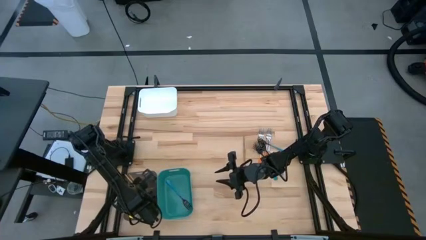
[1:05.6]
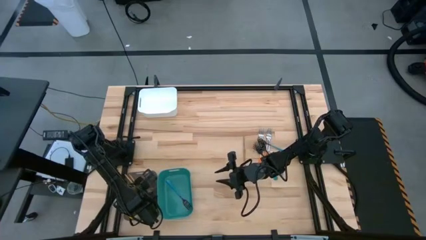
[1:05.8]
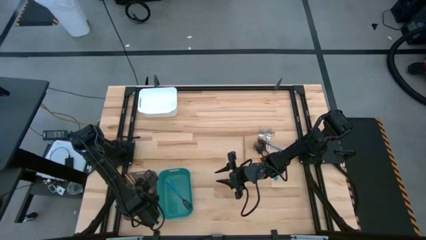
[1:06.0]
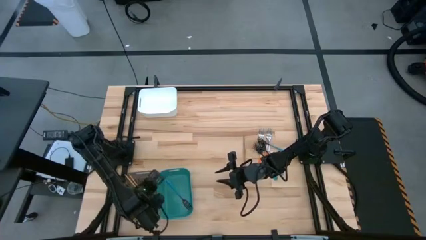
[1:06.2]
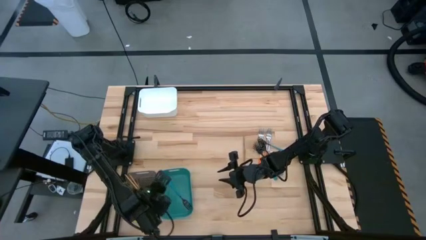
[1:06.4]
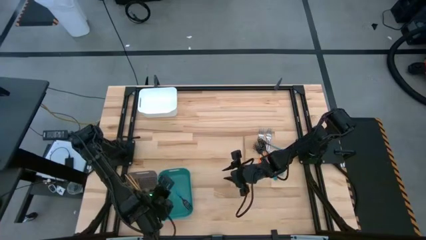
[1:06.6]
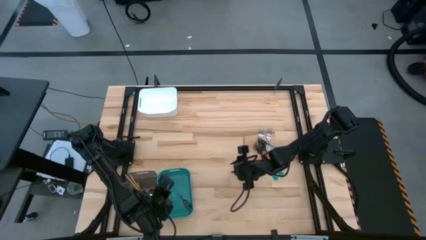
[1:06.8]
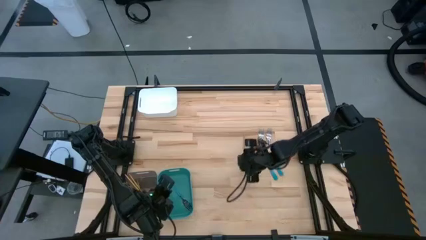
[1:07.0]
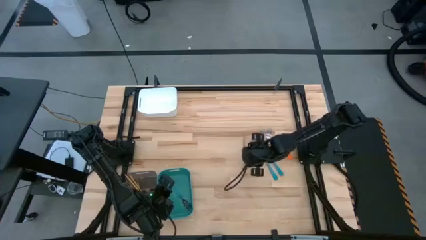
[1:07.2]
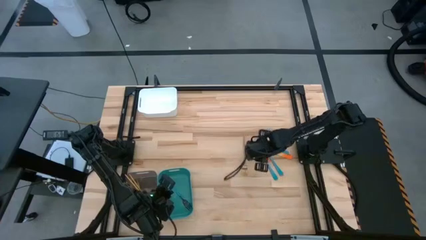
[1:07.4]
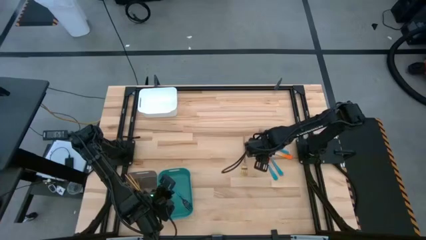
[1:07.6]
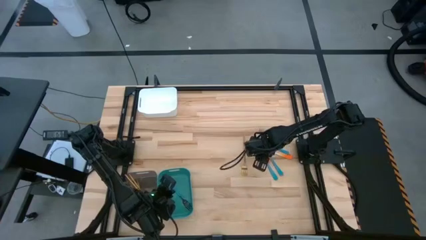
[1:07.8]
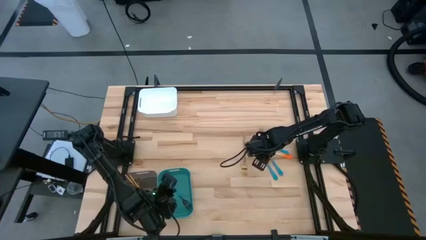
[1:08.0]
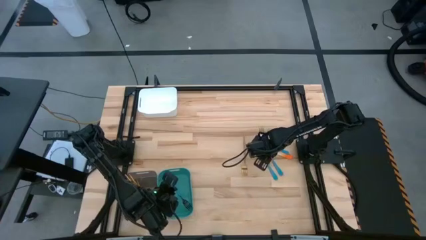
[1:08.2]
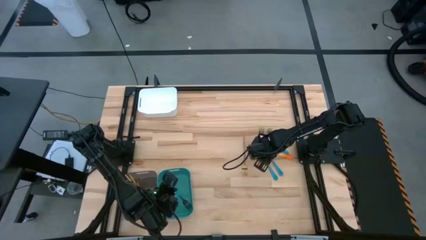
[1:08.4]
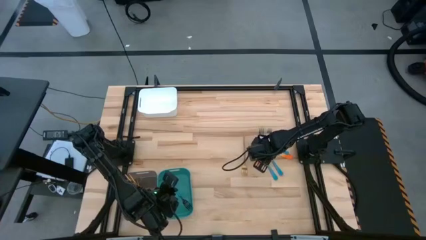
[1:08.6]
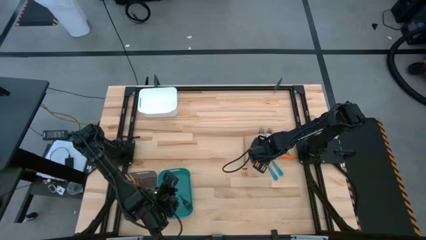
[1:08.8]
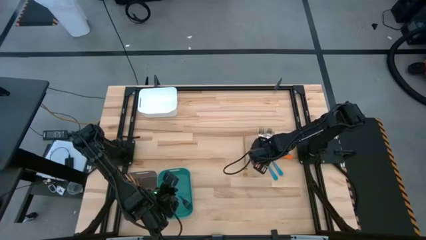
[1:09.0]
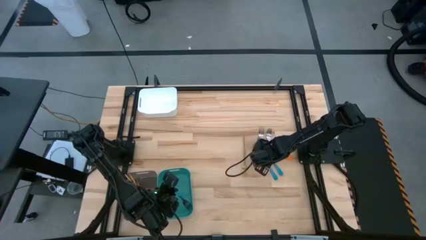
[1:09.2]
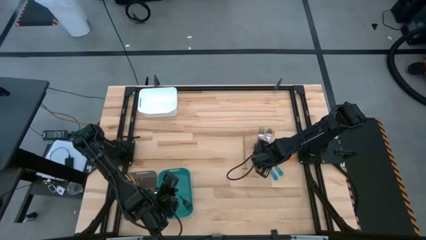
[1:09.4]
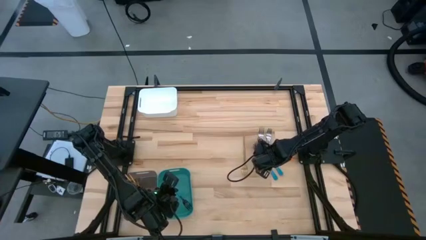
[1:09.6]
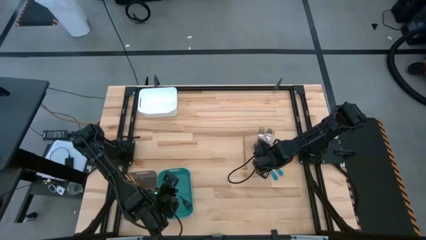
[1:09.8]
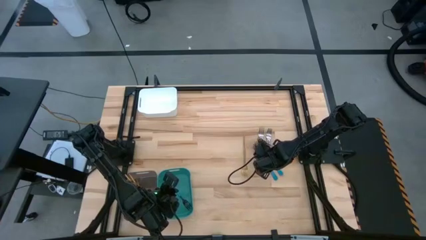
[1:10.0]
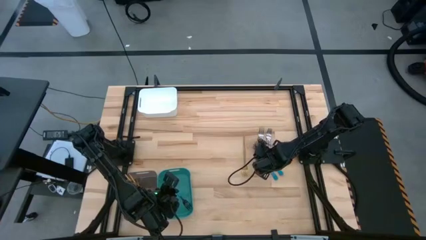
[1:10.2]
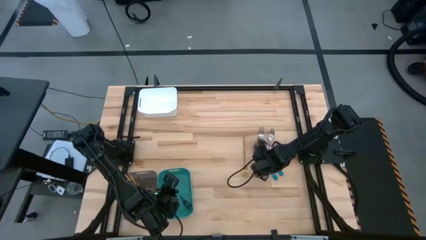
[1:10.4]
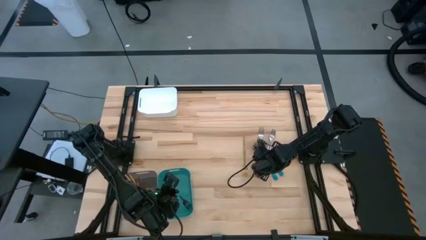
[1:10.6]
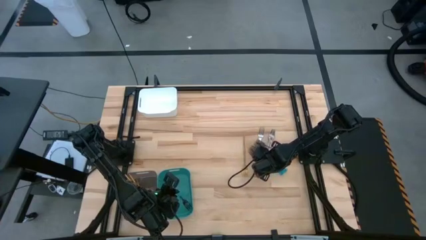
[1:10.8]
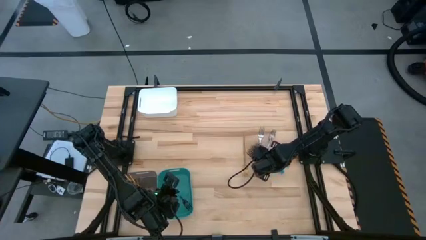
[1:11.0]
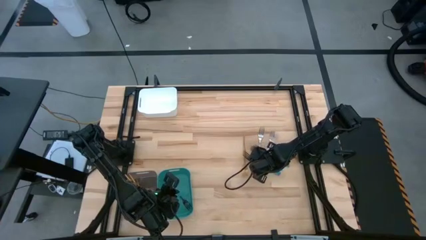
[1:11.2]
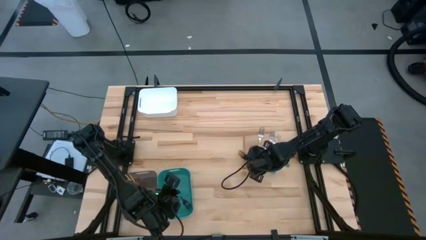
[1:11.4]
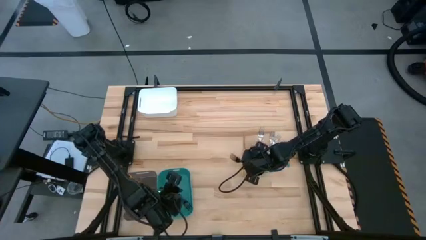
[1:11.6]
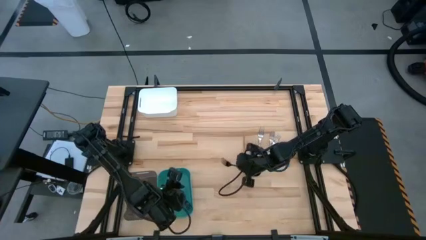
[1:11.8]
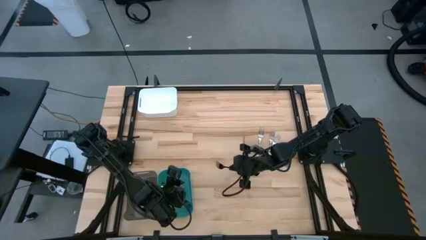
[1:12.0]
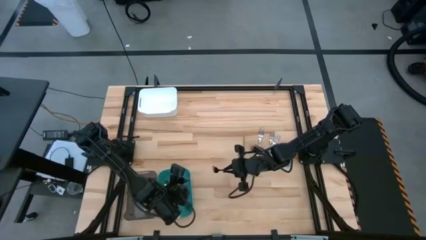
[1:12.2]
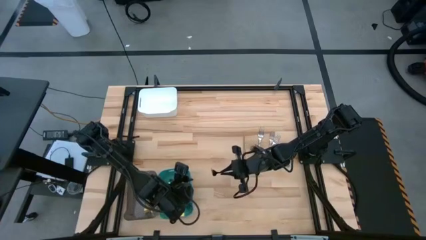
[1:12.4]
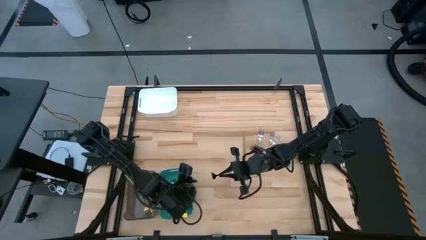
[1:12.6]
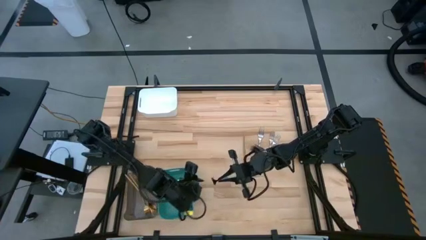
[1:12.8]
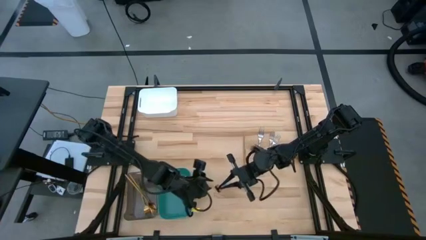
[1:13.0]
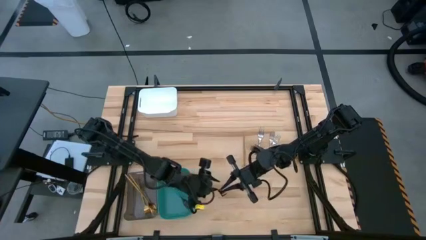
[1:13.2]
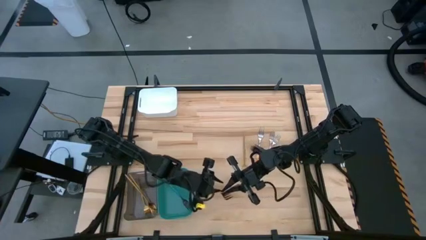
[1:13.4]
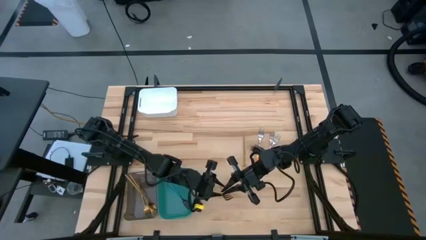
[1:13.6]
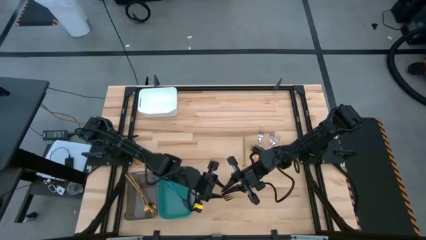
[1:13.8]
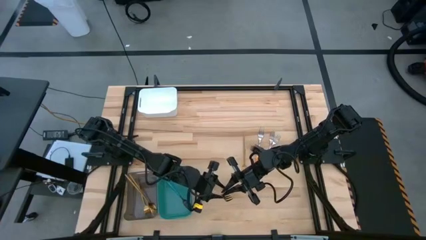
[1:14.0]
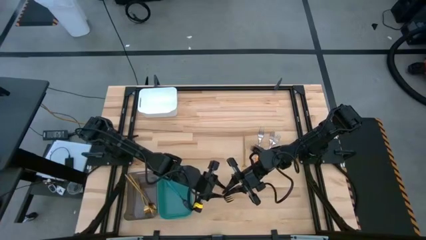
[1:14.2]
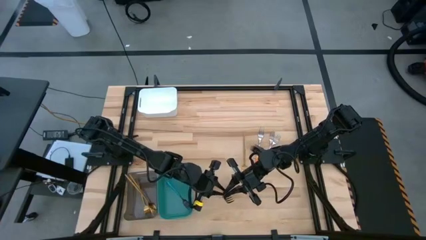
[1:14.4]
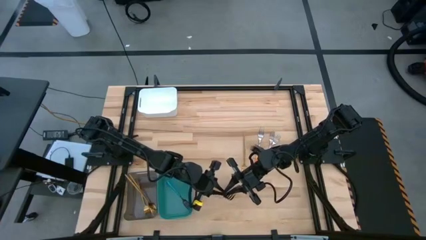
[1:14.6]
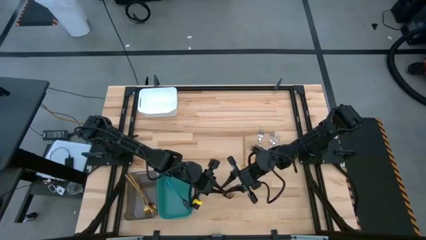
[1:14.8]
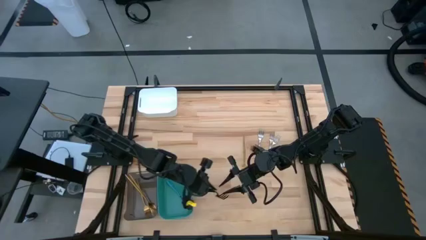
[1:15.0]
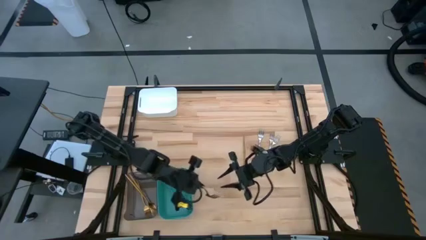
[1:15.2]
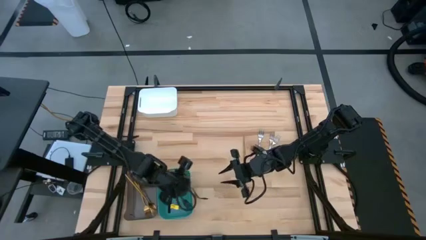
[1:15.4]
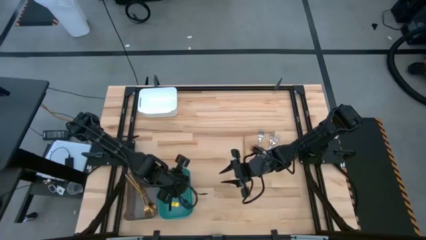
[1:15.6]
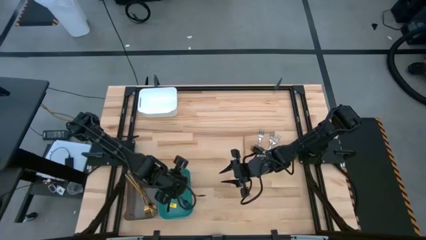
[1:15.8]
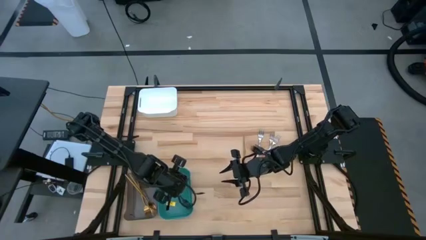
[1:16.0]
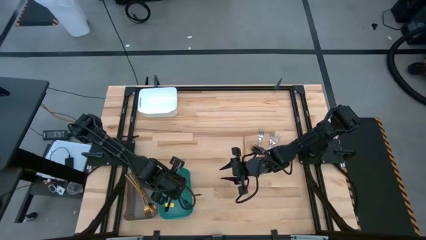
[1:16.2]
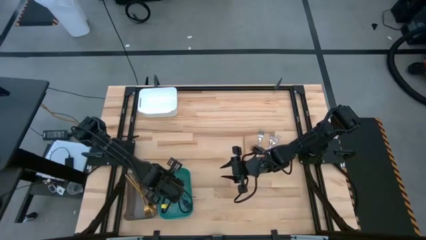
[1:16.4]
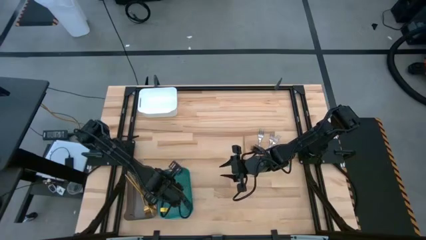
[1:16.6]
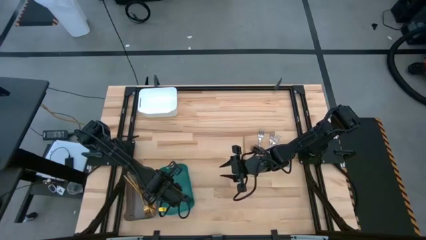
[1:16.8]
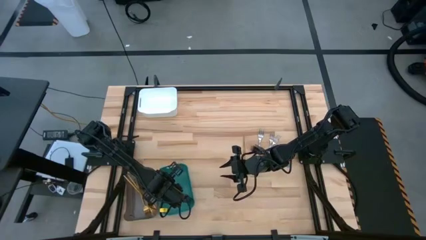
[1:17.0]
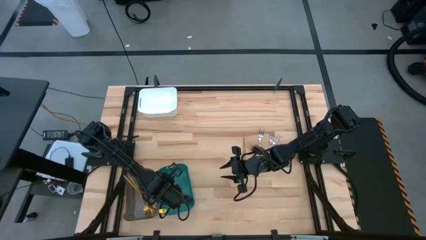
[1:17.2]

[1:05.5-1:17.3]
Task: Sort silverware by color (type)
Put the blue fork into the green bin
